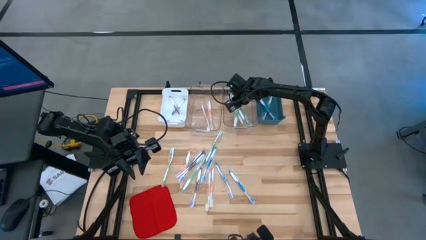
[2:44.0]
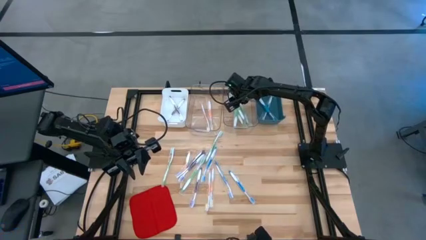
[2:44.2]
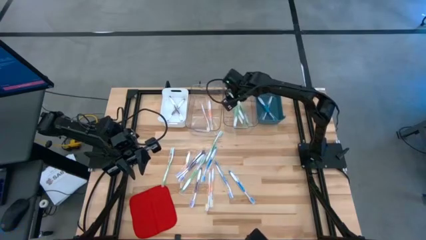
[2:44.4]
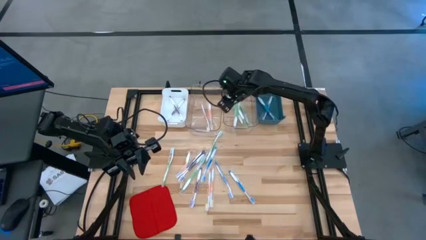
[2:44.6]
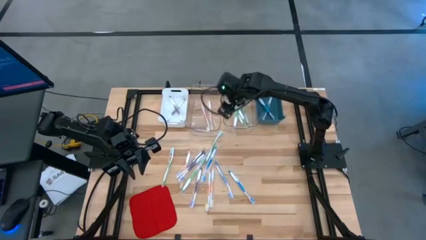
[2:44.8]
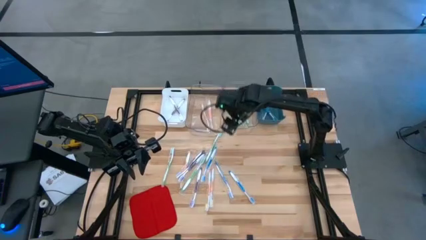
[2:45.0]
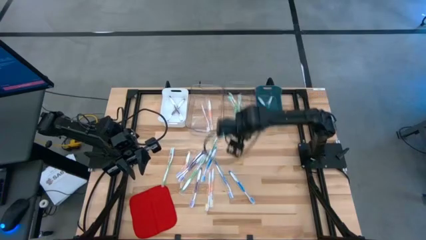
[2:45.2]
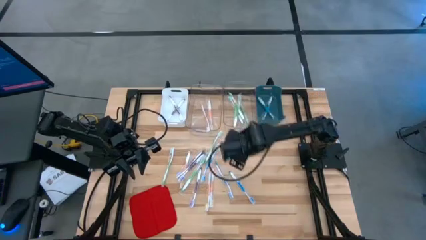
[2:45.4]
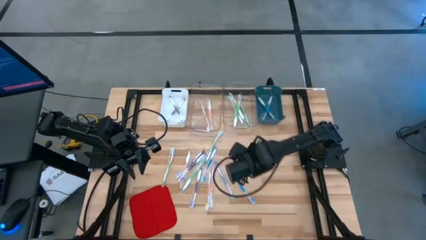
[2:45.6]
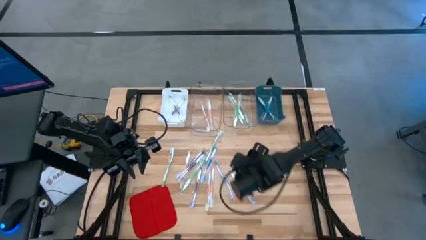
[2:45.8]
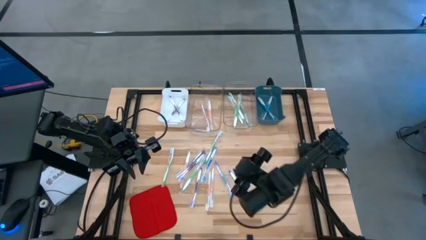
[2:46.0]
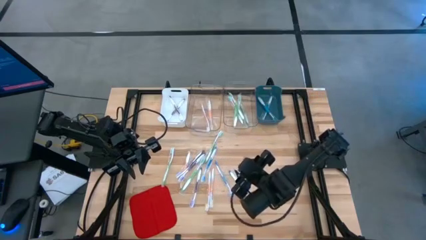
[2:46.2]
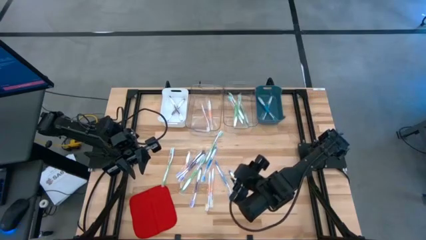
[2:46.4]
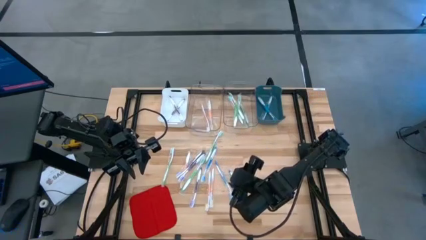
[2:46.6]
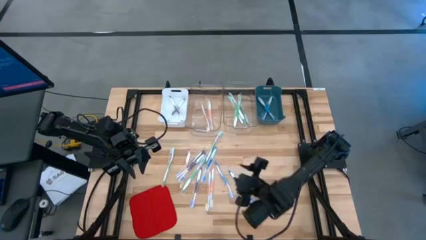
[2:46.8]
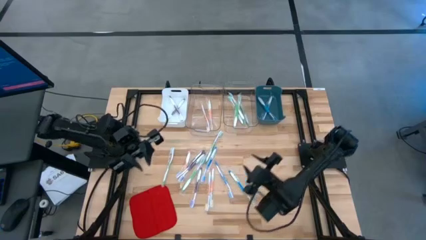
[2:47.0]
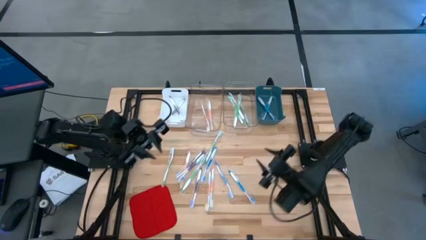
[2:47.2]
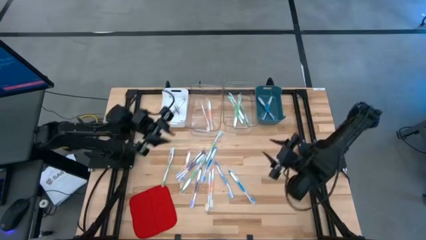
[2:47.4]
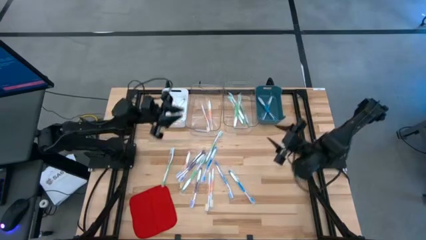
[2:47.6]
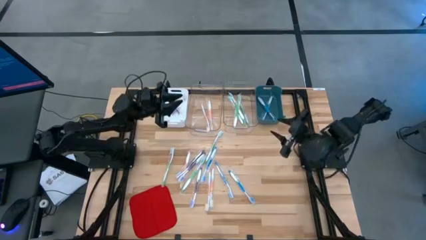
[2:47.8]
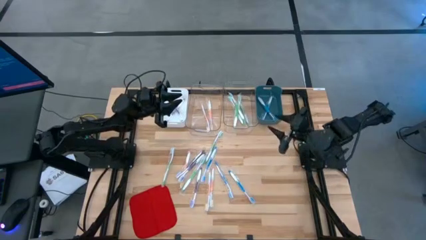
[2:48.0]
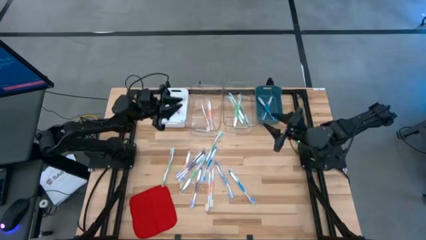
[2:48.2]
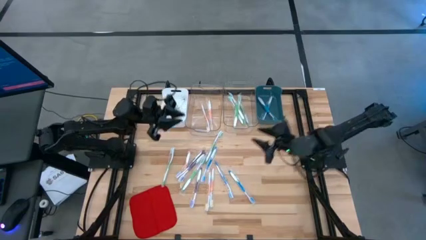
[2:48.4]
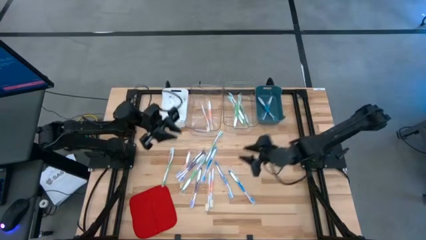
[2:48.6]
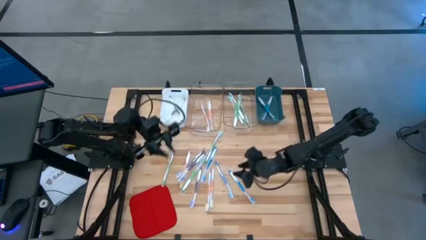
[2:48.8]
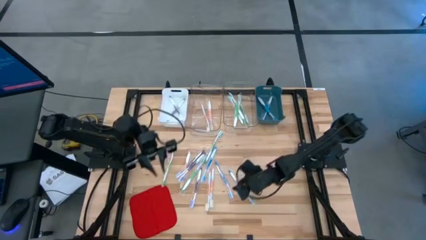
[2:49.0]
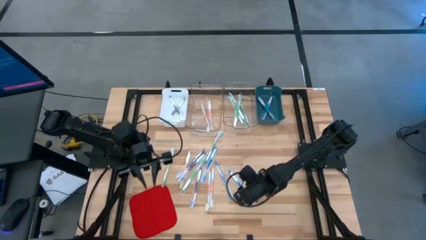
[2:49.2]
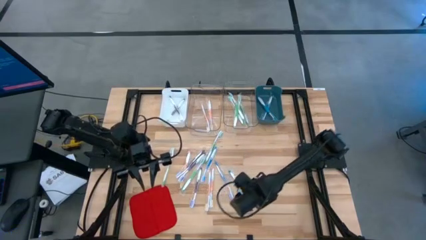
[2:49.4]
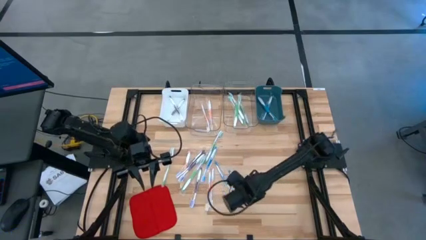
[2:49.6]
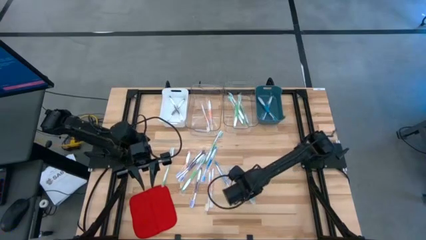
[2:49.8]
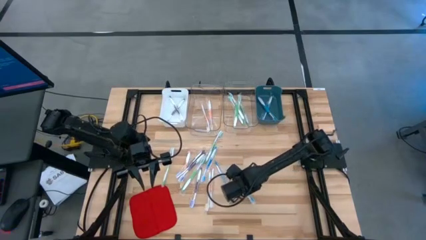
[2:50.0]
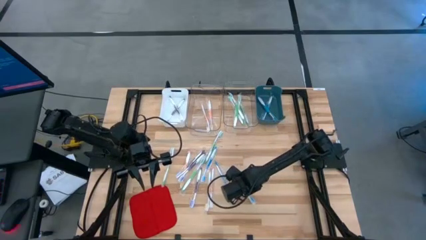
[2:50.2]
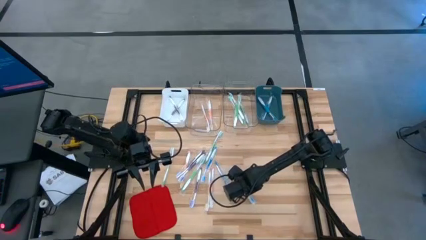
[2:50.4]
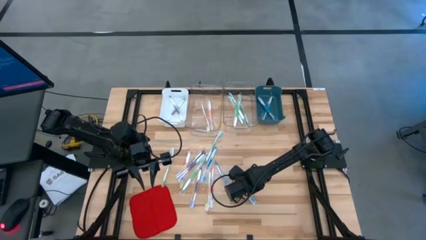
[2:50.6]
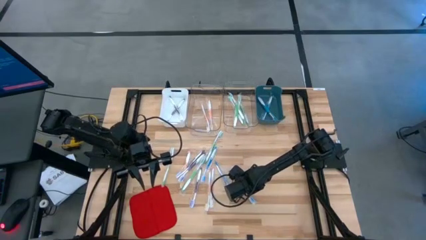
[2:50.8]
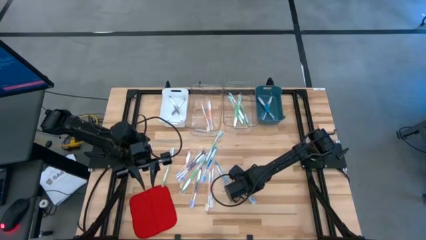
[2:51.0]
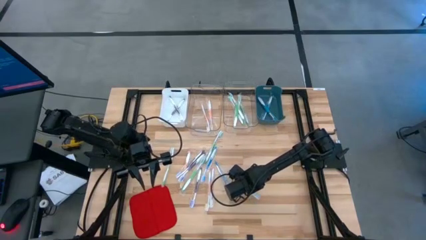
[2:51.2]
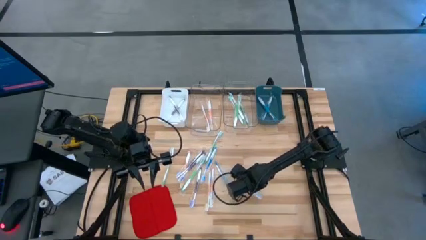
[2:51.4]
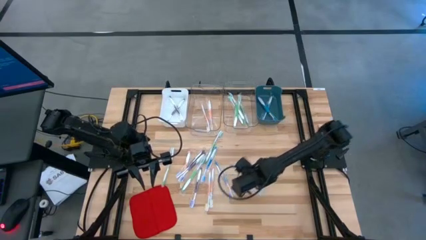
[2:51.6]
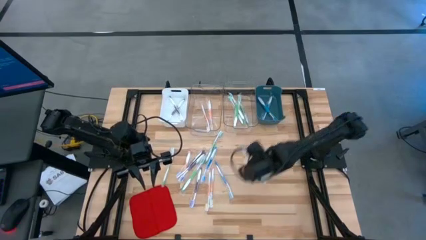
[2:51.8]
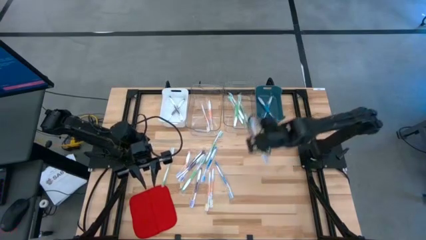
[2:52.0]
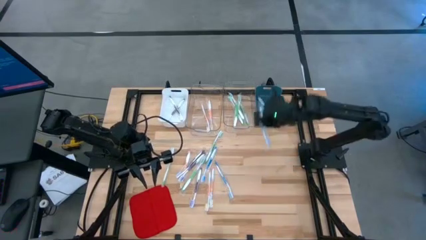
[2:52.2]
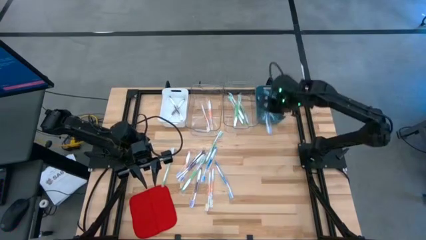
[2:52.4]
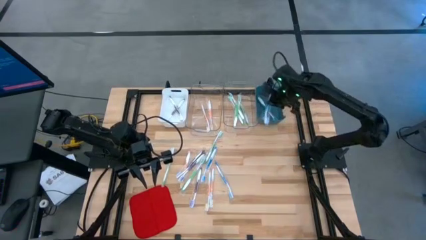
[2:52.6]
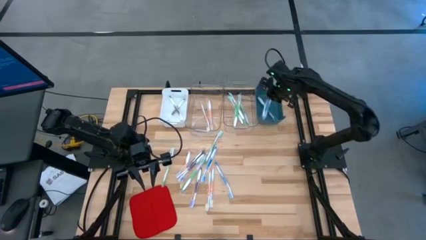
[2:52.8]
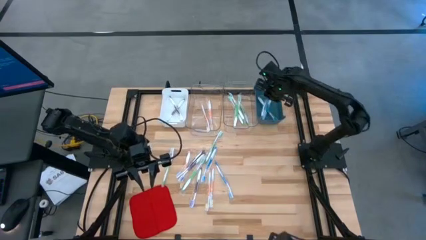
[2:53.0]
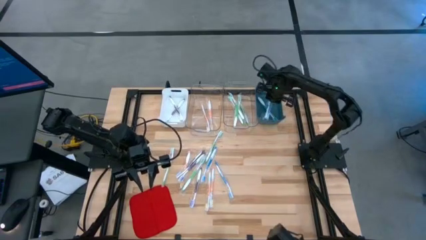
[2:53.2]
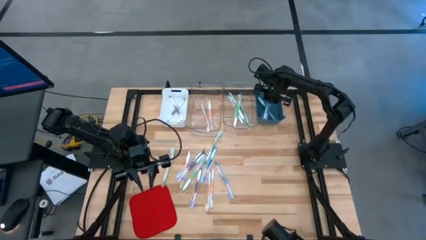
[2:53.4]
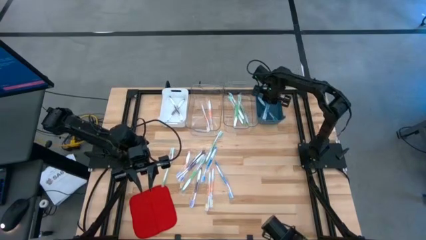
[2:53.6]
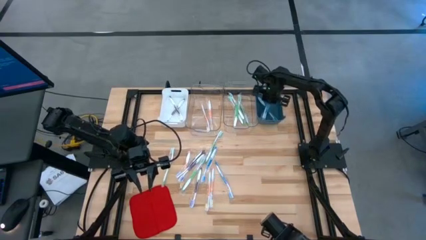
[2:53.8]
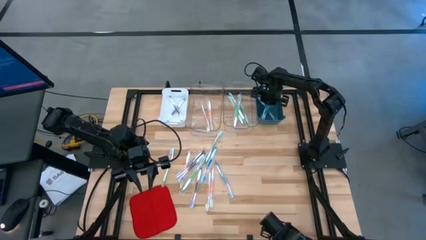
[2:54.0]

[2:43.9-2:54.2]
Task: Pick & Place Toothbrushes
Put the blue toothbrush into the blue bin

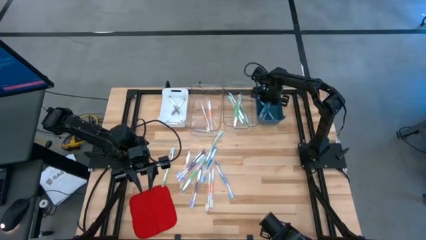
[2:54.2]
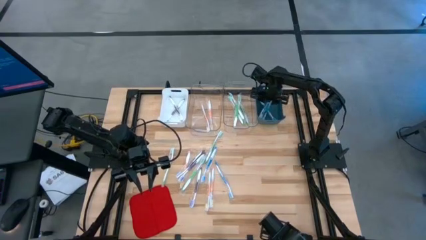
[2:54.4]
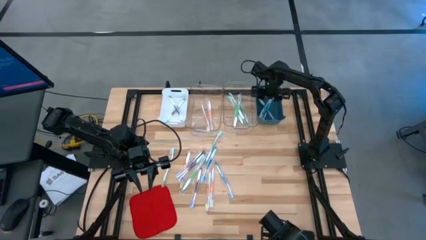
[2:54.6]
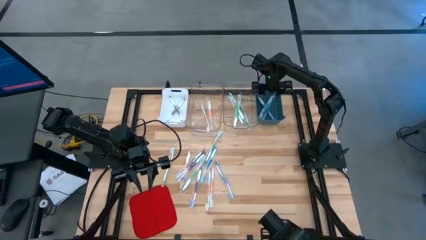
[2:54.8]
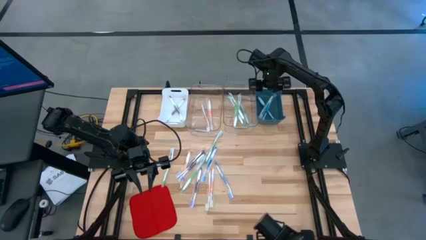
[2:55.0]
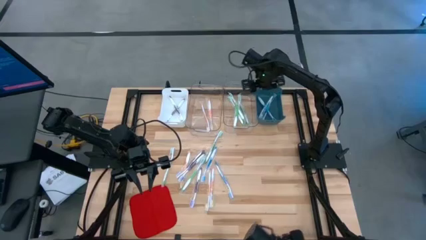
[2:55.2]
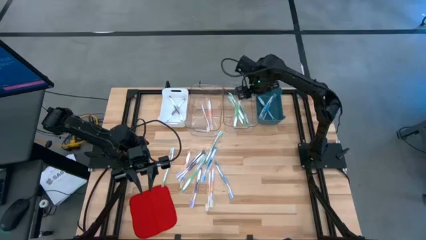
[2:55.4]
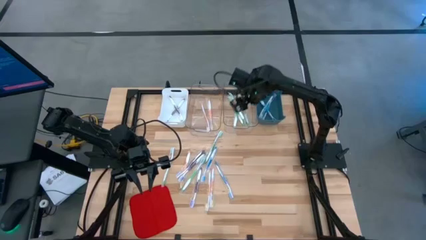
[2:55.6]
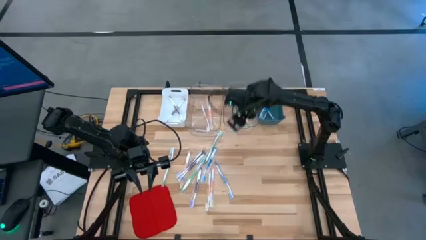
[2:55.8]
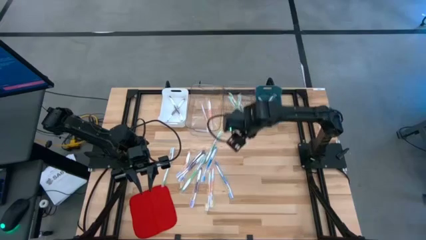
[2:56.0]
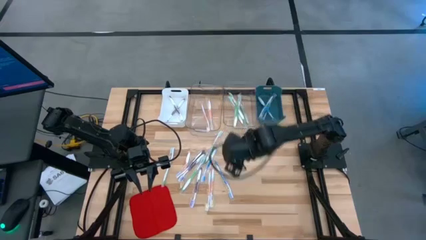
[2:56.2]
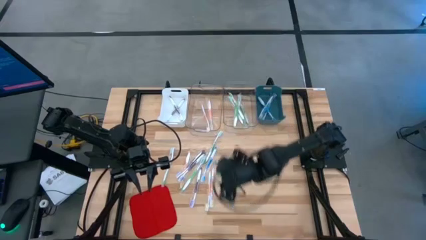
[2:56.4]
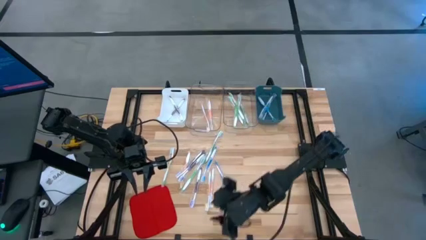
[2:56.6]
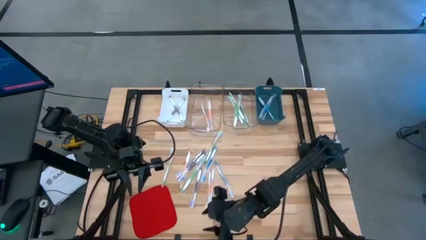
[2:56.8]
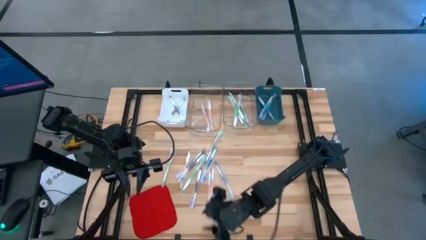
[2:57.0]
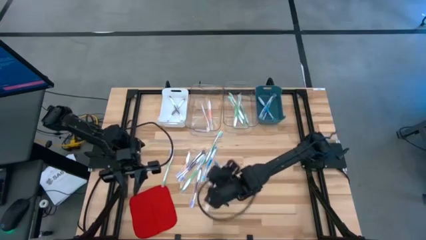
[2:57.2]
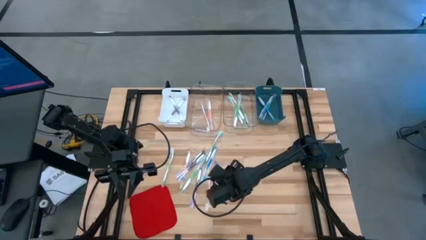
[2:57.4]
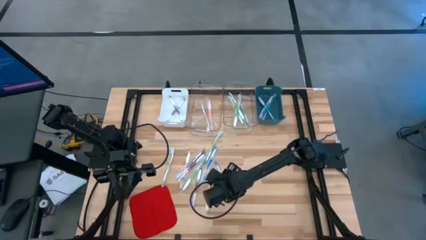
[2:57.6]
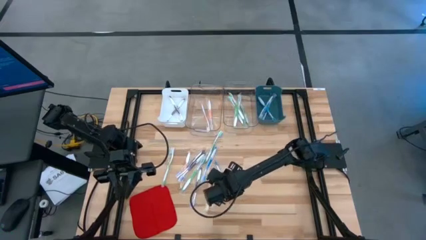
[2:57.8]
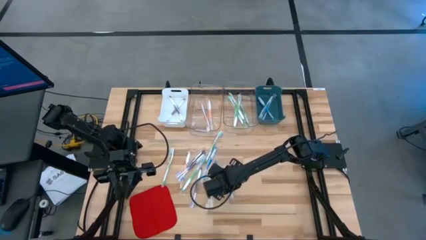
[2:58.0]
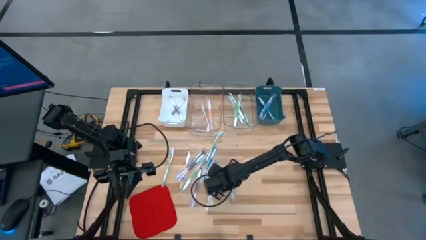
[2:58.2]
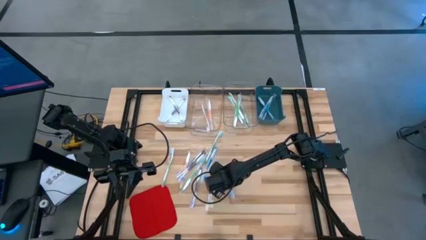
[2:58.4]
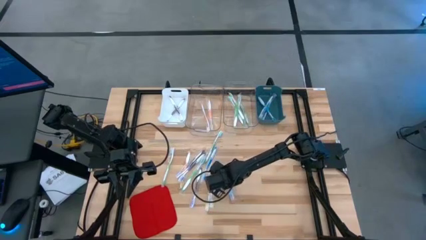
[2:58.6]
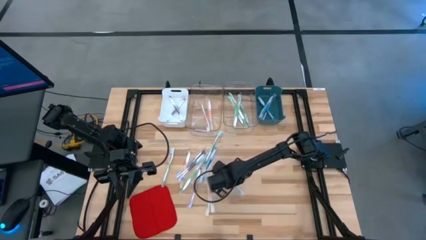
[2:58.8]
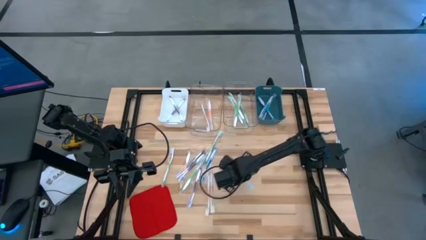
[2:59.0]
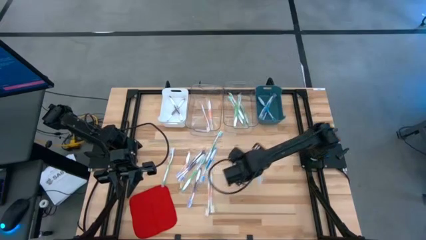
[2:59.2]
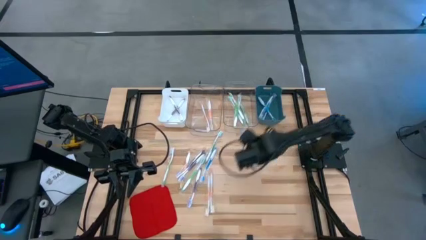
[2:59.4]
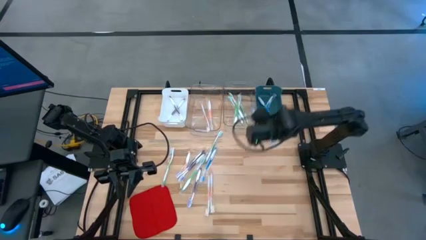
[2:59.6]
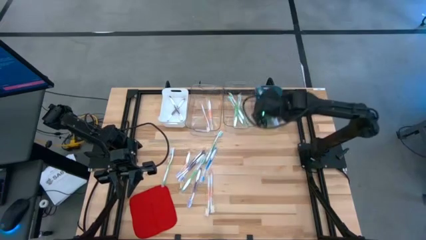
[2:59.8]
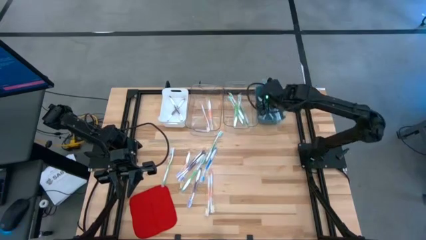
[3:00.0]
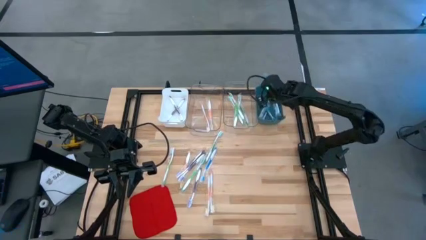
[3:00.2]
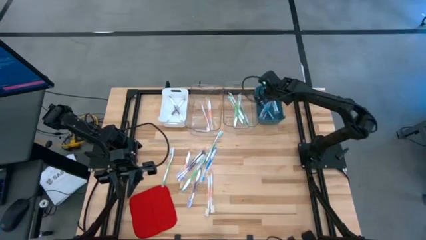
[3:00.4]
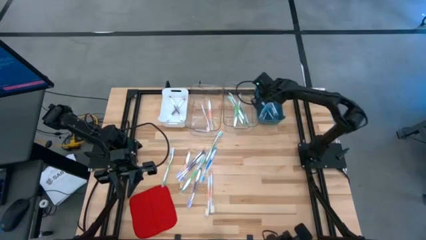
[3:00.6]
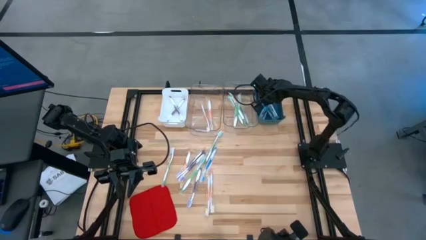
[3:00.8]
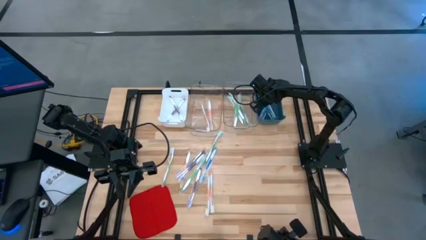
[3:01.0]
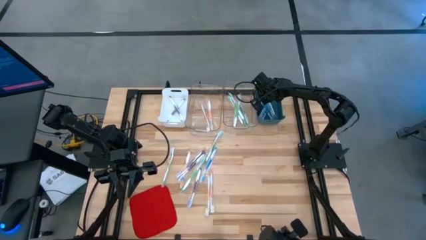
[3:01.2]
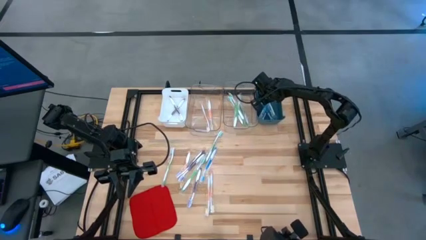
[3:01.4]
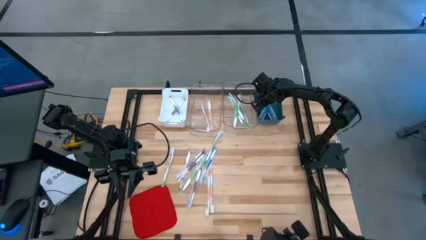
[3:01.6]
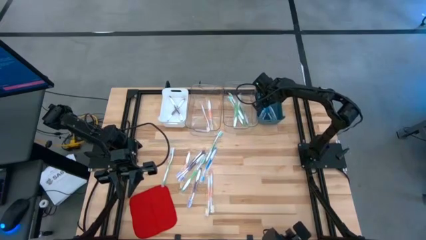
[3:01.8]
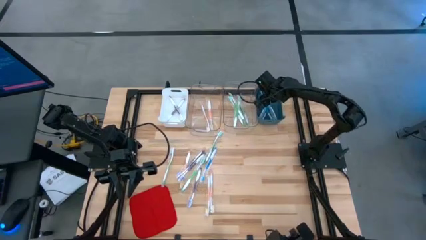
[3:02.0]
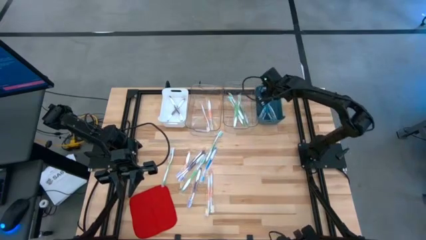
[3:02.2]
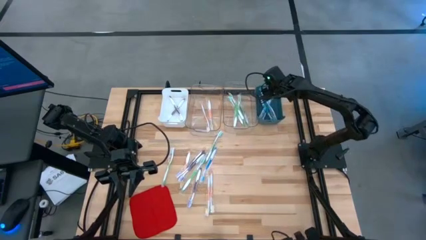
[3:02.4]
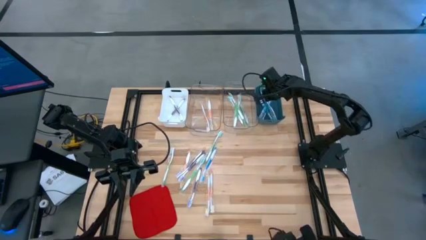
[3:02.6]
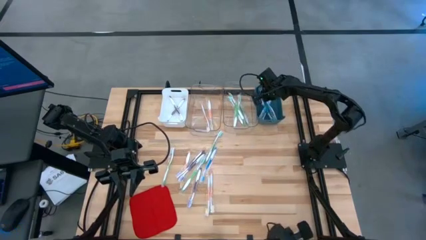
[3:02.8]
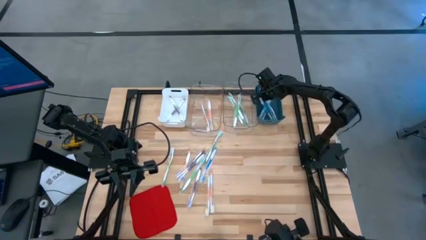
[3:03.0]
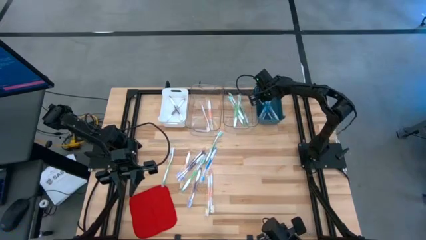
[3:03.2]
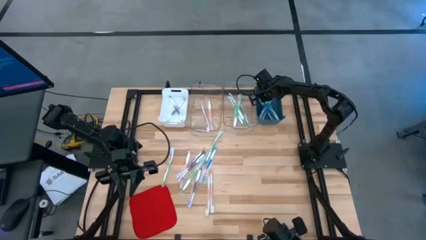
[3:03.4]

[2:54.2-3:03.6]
Put the blue toothbrush into the blue bin
